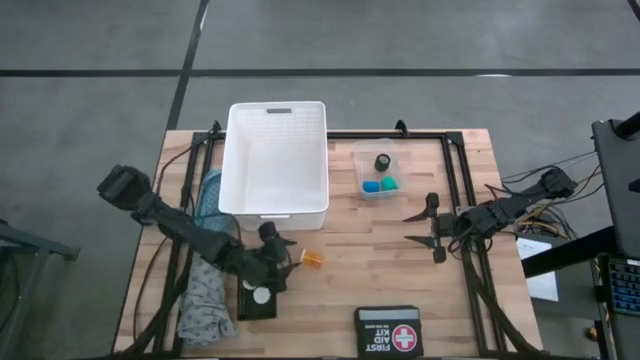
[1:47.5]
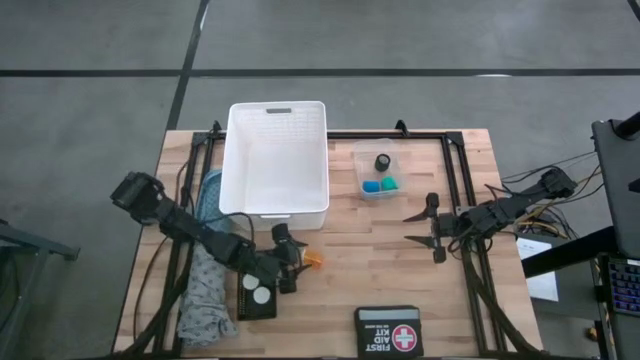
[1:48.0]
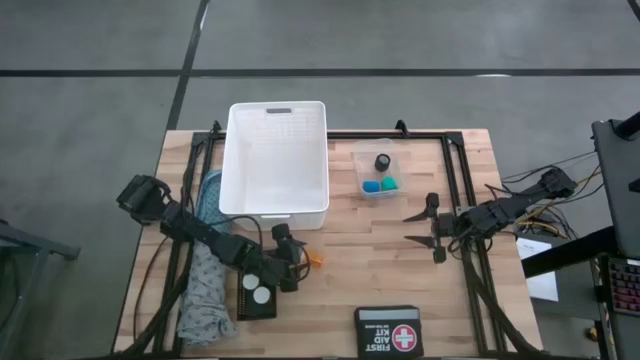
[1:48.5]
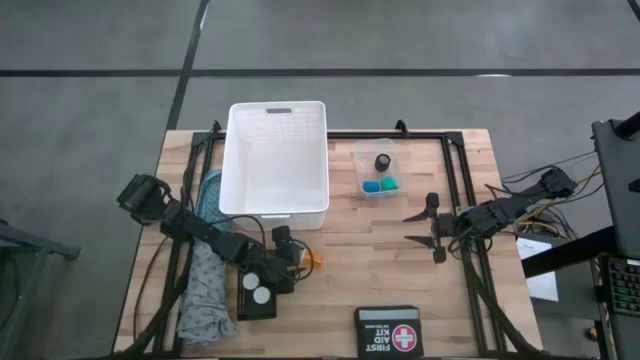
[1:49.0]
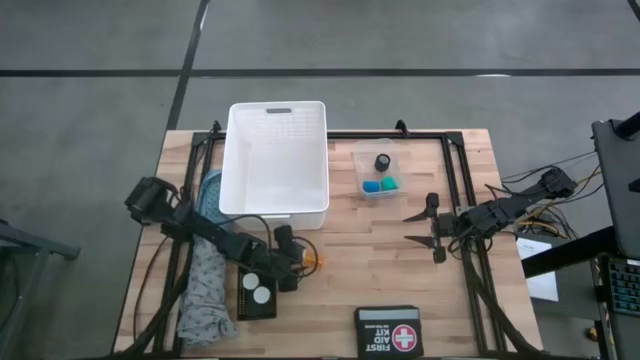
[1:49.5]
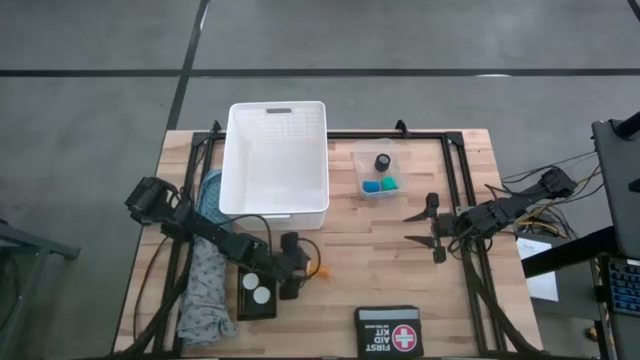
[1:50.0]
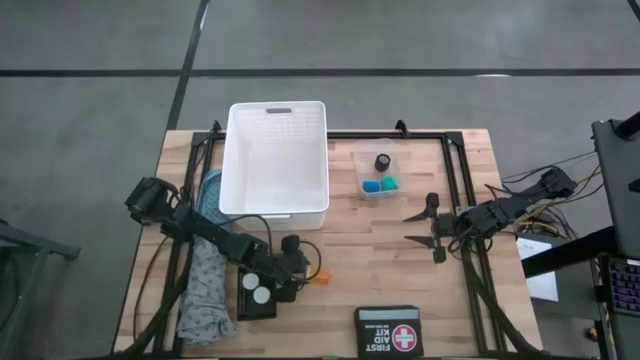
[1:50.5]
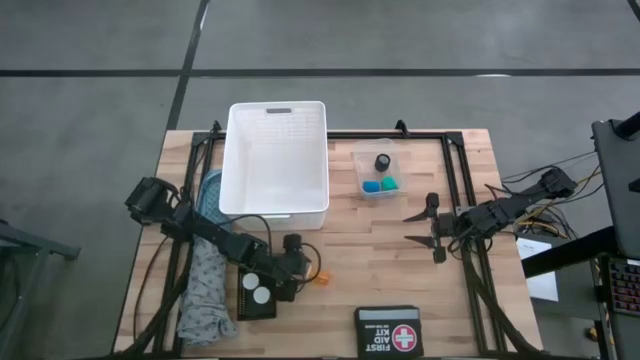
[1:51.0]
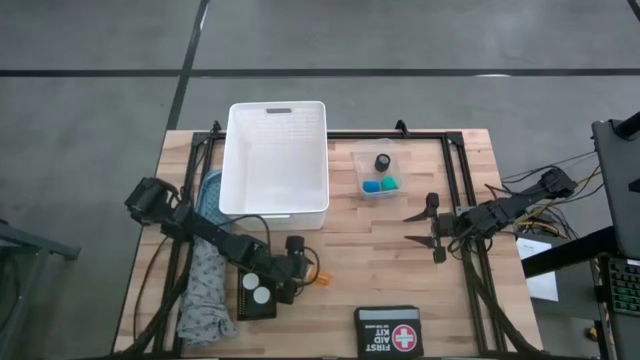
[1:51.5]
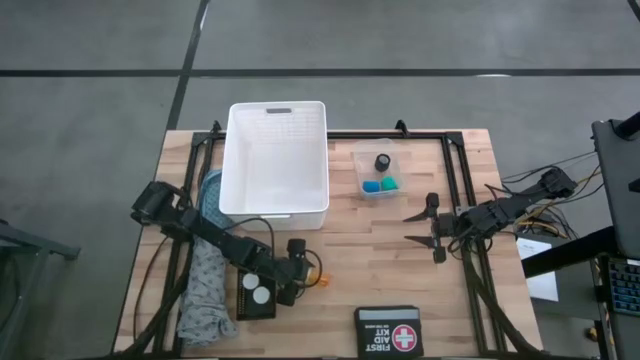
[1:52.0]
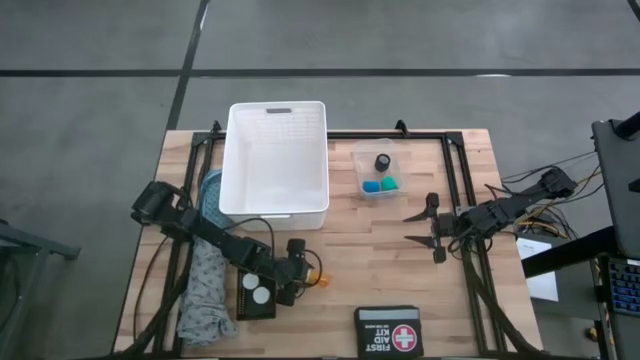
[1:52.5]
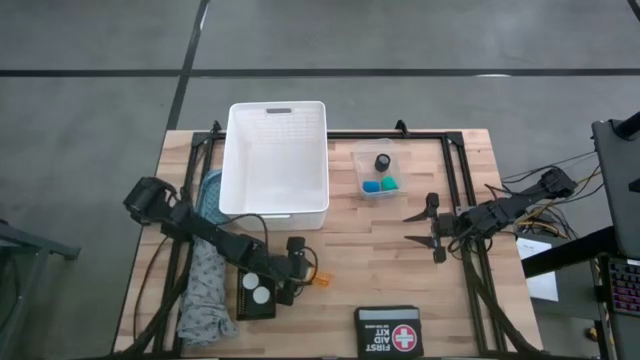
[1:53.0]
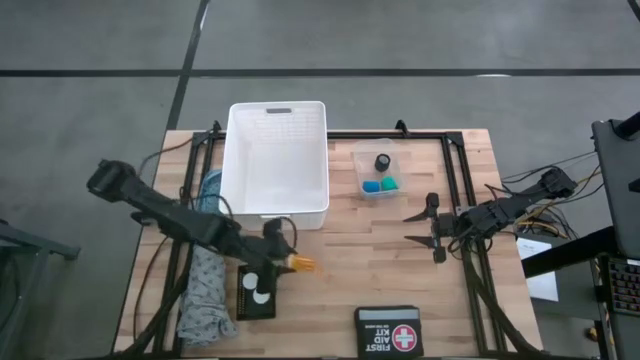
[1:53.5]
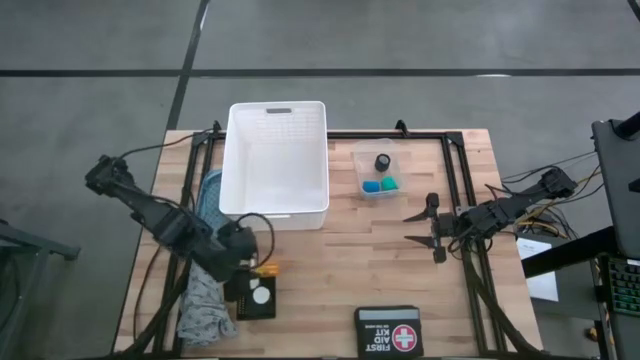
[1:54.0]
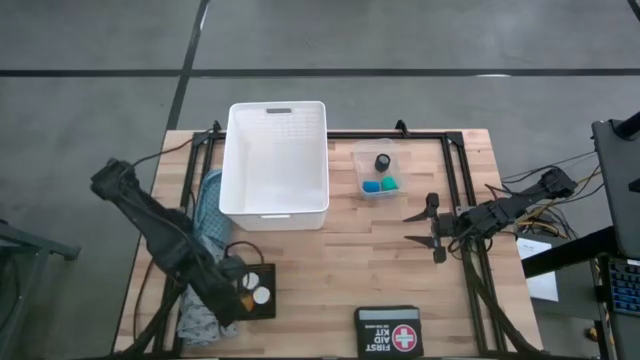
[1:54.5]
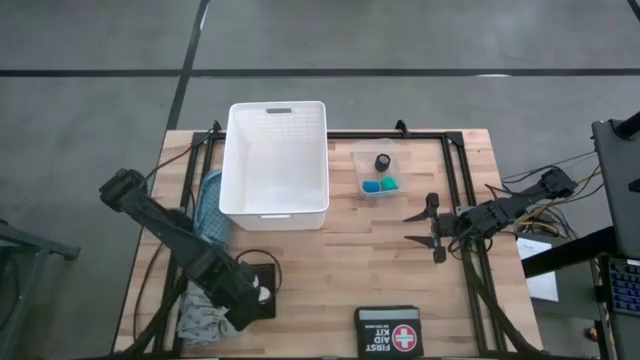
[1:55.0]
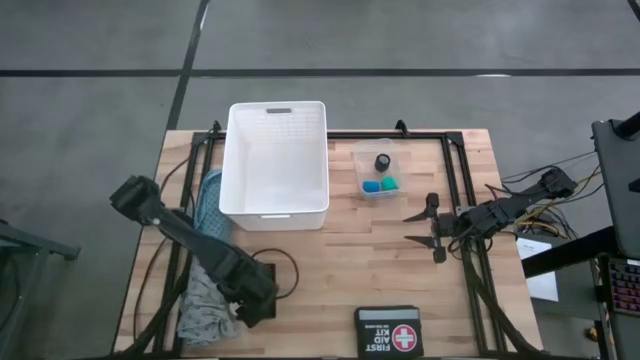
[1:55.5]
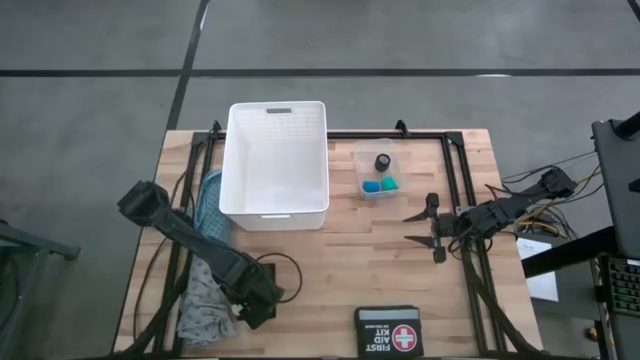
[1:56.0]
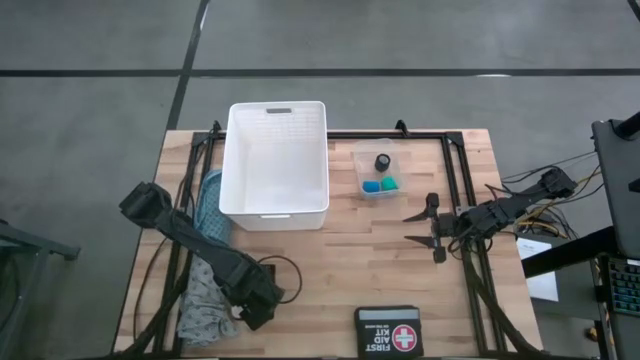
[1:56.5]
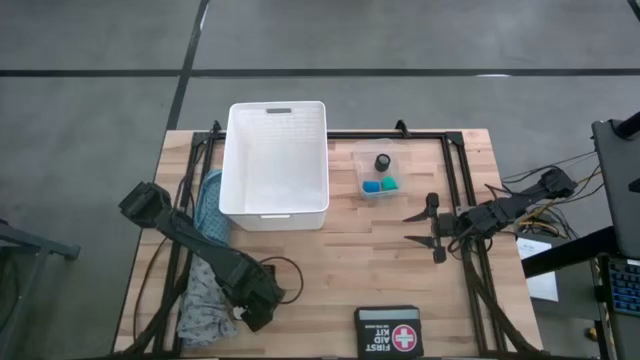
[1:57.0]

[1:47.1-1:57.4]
Task: Pick & place medical supplies in basket/bin
Put the orange pill bottle into the black bin

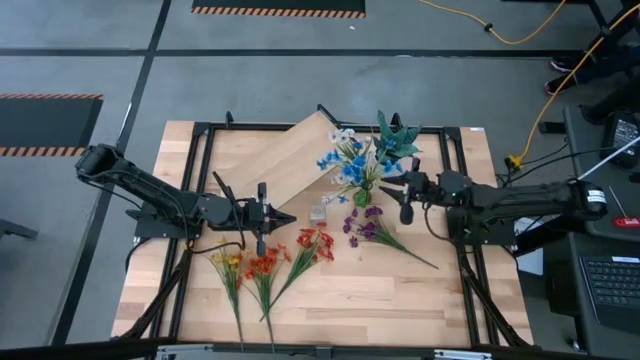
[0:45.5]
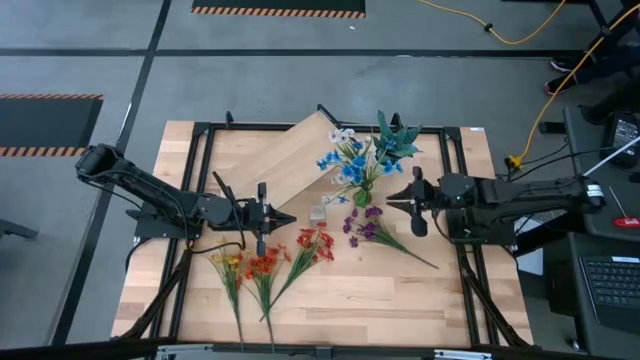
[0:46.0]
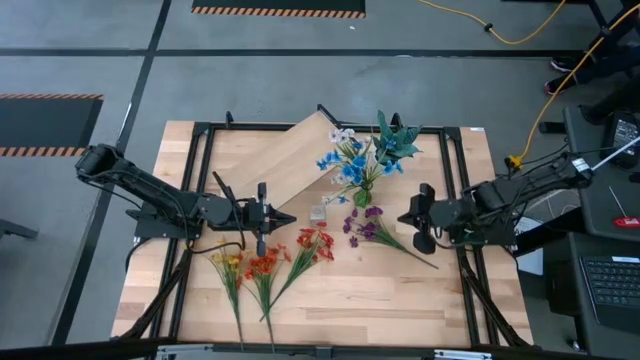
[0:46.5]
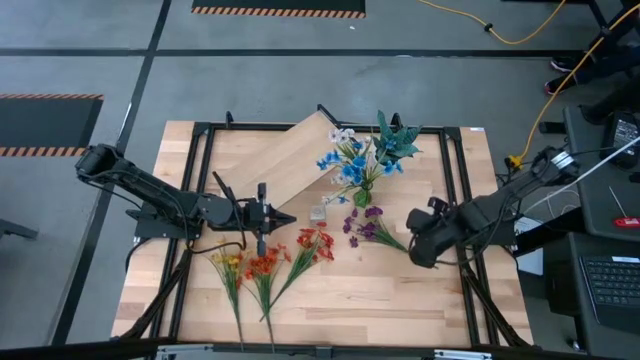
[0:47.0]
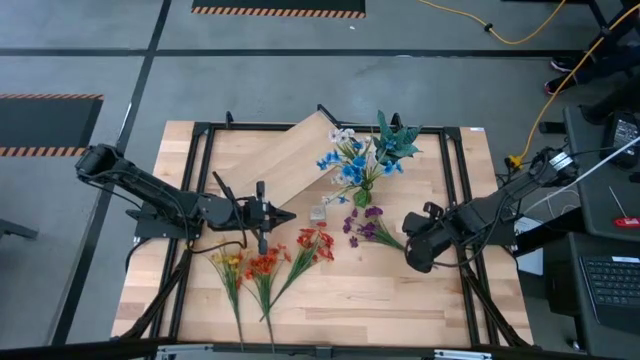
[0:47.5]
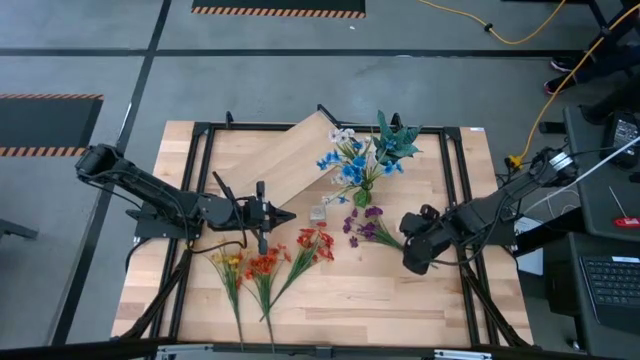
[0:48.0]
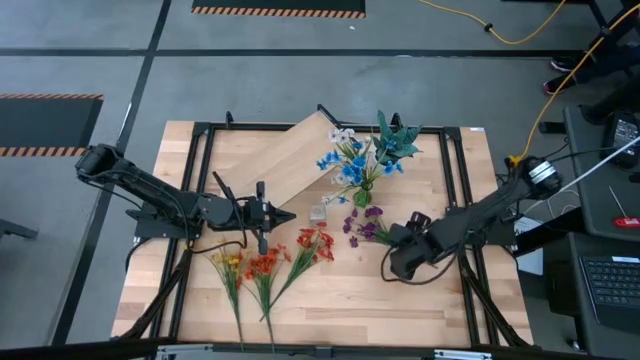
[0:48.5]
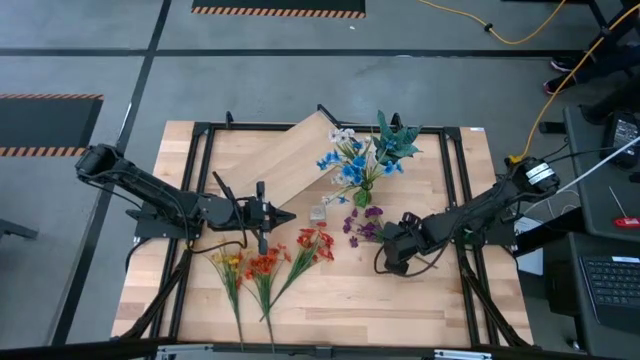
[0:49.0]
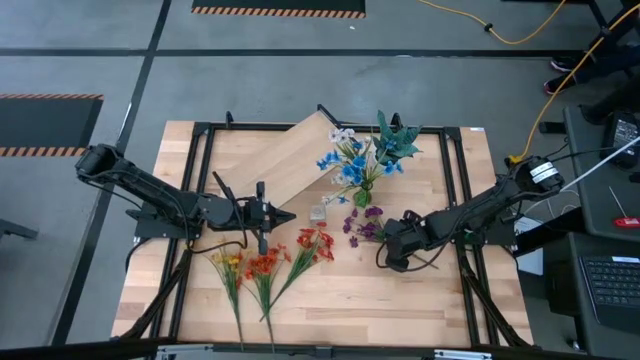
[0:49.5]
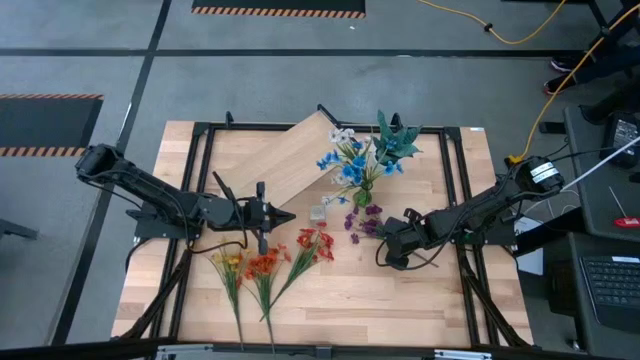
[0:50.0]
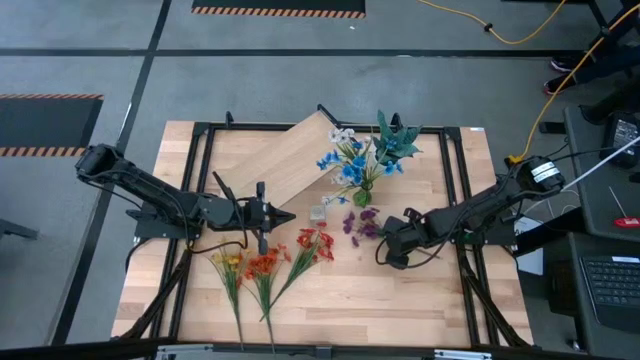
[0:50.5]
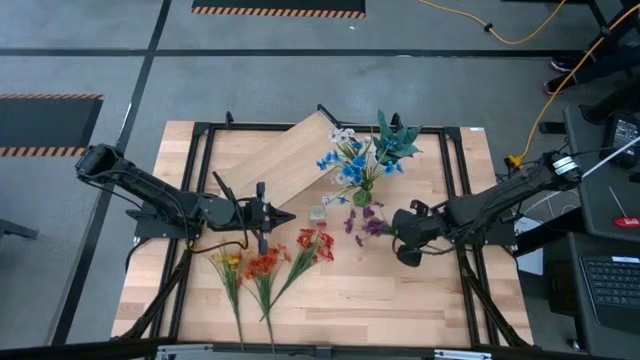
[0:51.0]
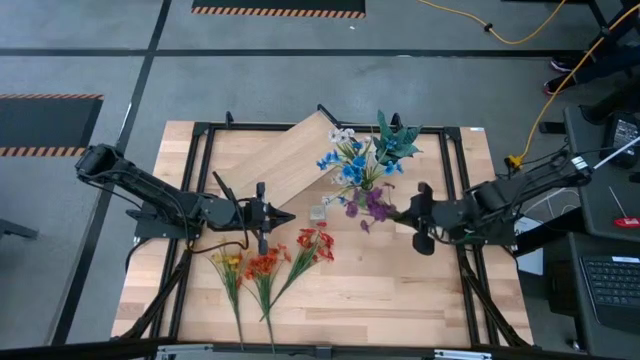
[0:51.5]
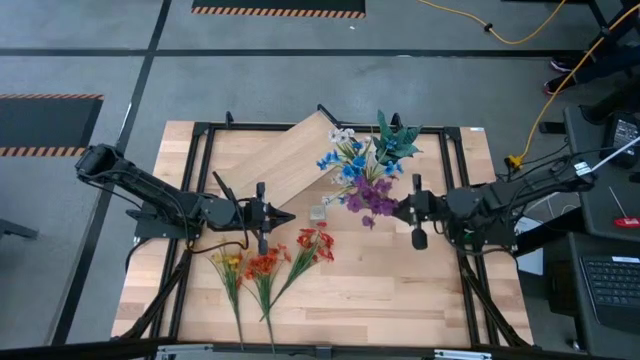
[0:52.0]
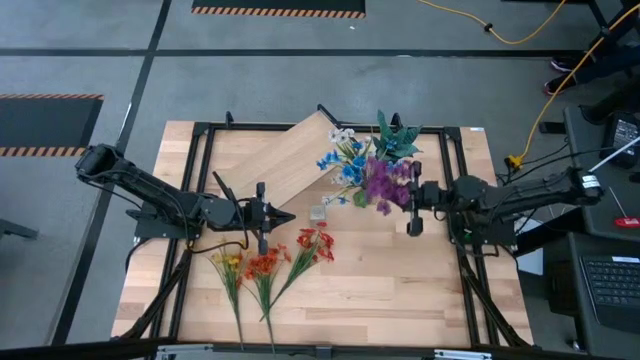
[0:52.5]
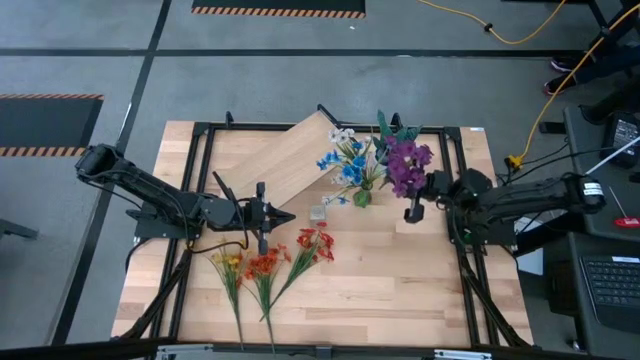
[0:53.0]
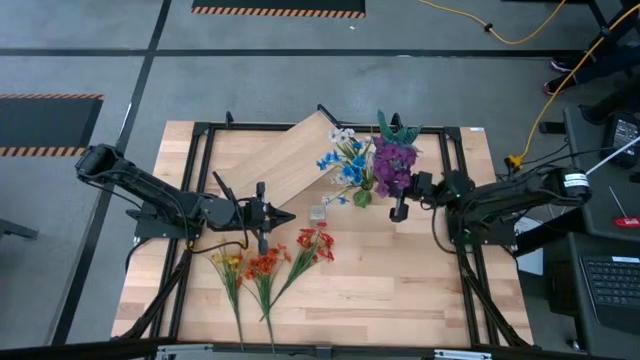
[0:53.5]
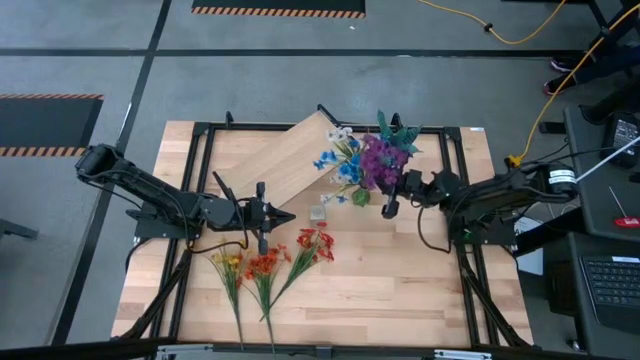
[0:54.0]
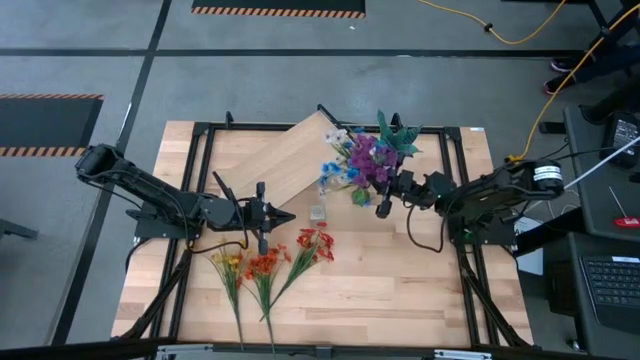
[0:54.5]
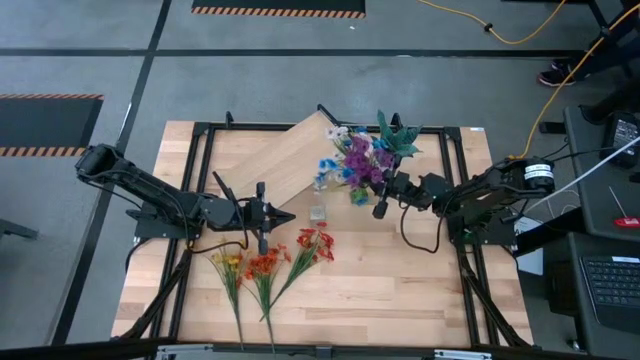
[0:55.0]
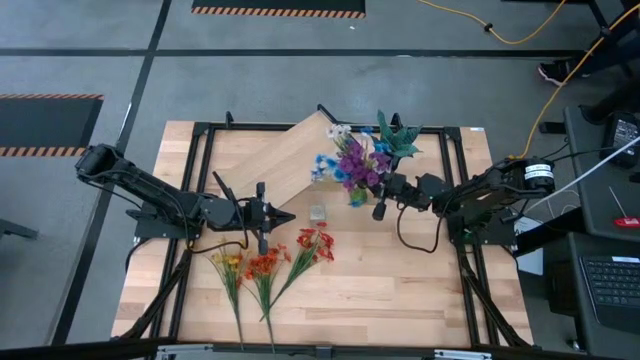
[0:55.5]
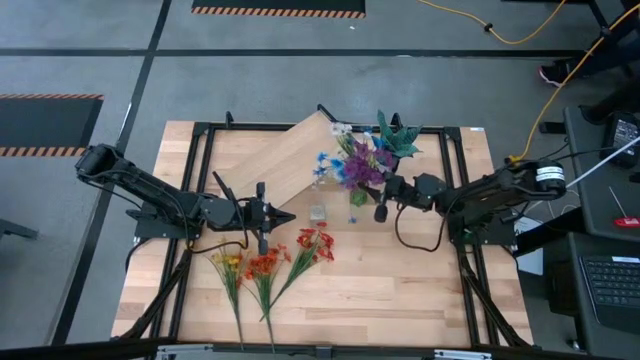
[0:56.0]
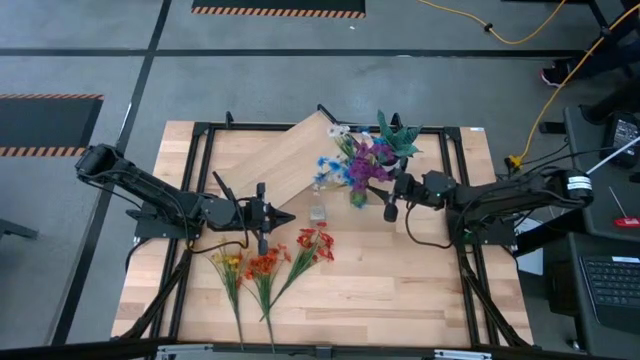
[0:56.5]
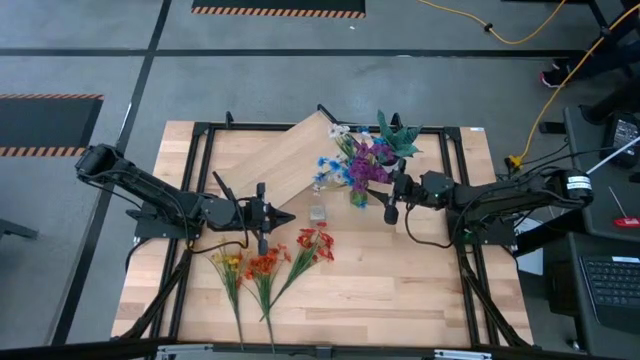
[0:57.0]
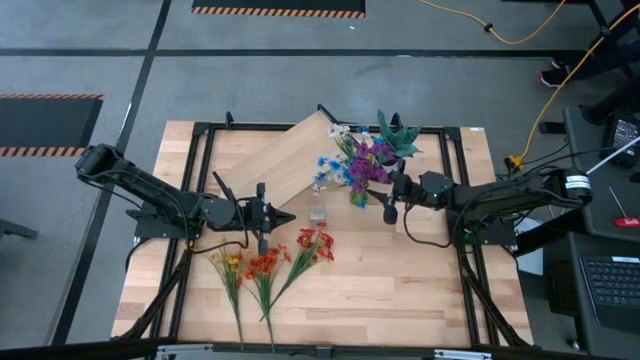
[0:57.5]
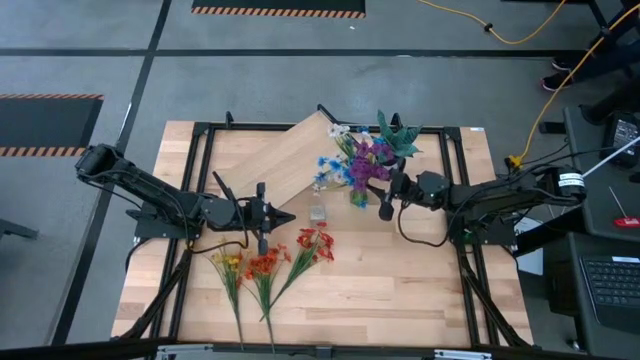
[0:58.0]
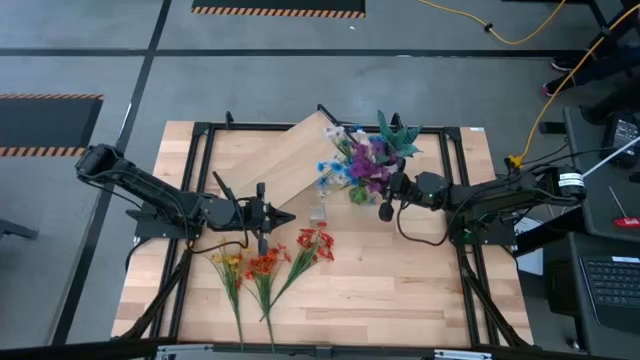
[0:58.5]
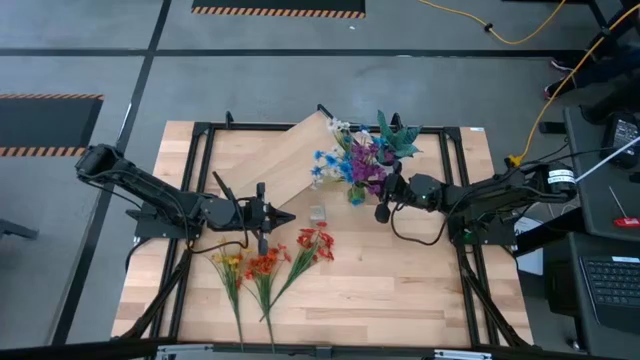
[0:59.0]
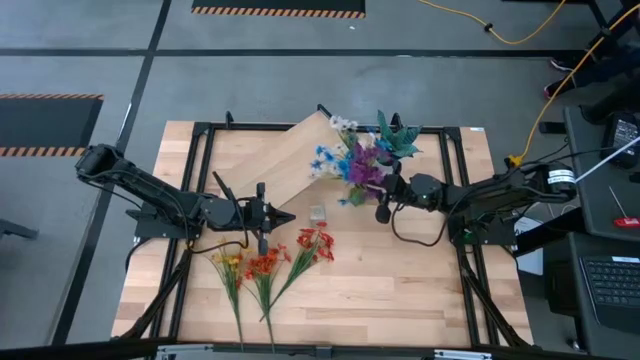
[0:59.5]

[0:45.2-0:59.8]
Task: Pick and place flowers into a vace then onto a shelf
Put the purple flowers into the green vase
